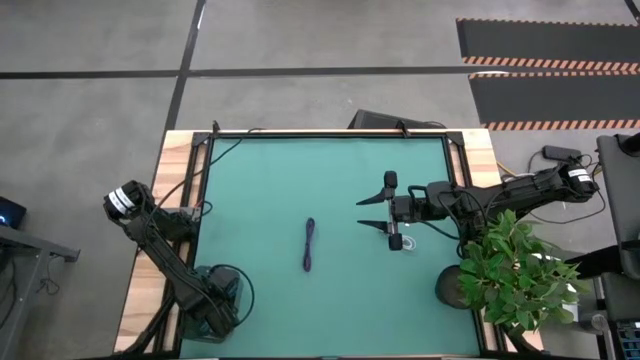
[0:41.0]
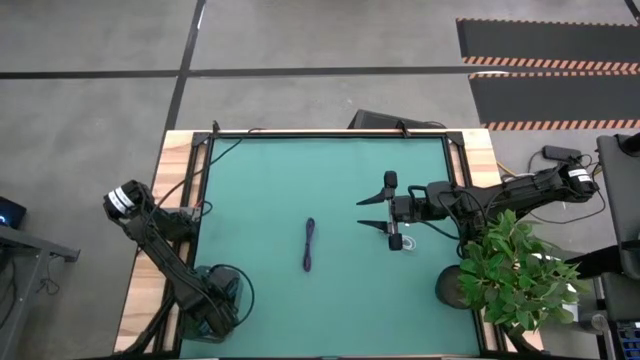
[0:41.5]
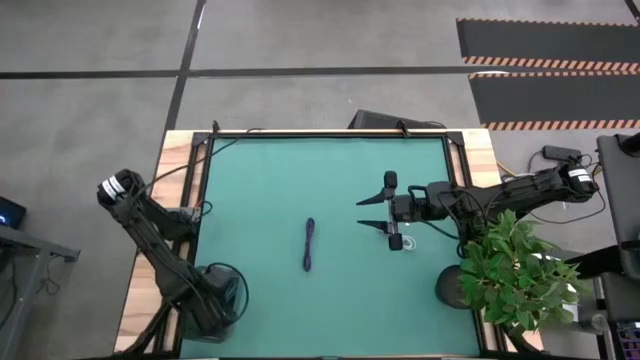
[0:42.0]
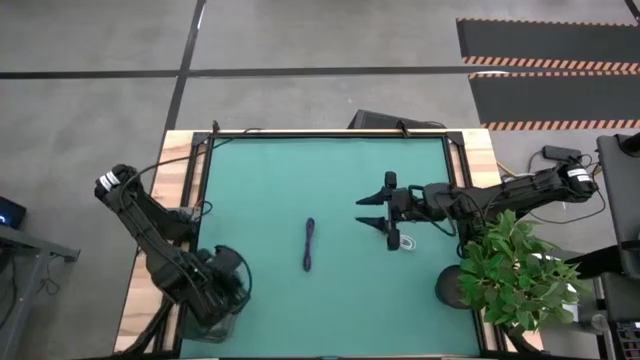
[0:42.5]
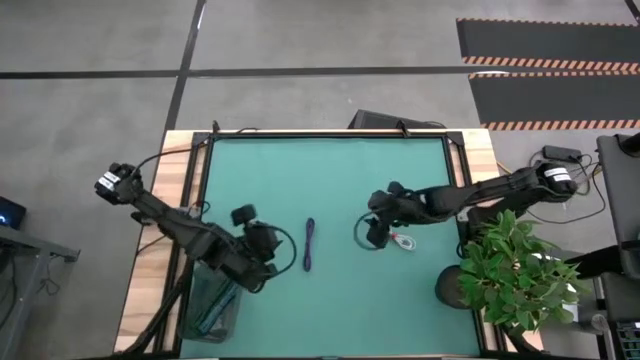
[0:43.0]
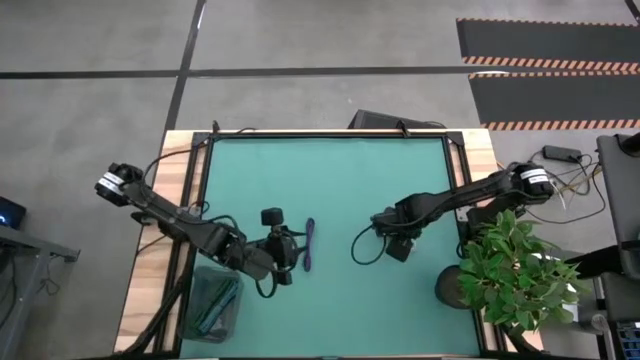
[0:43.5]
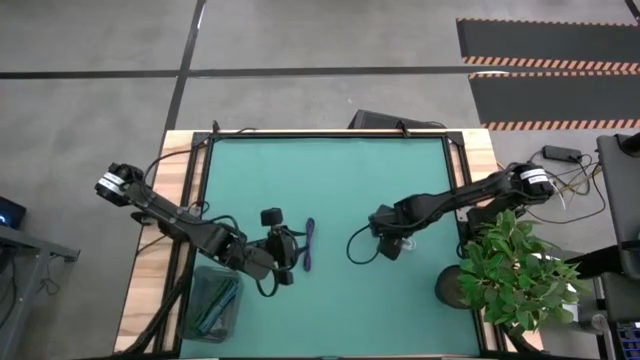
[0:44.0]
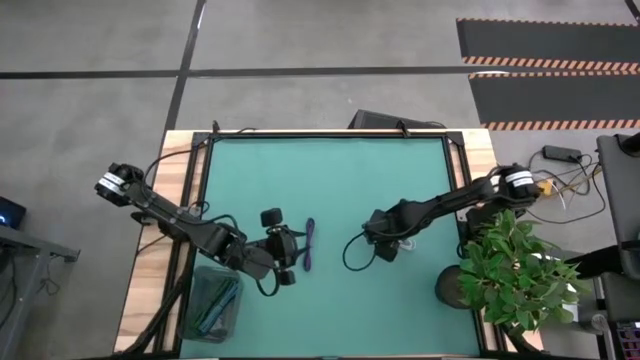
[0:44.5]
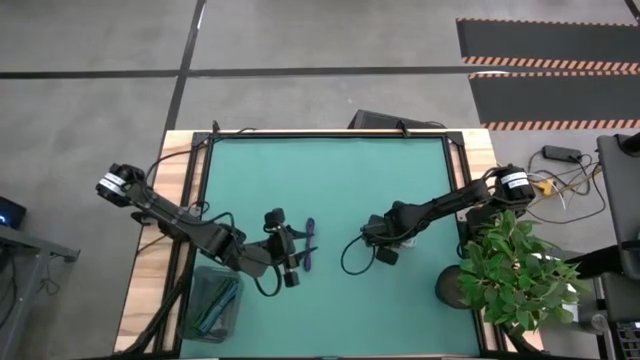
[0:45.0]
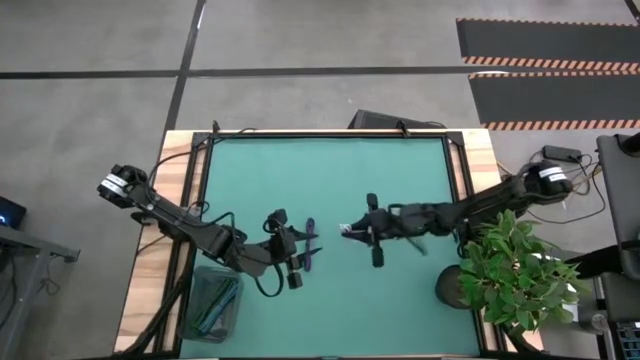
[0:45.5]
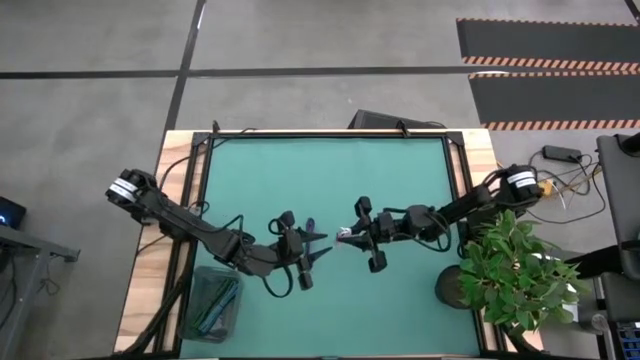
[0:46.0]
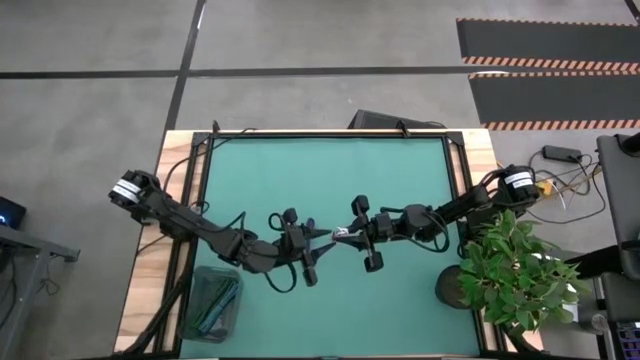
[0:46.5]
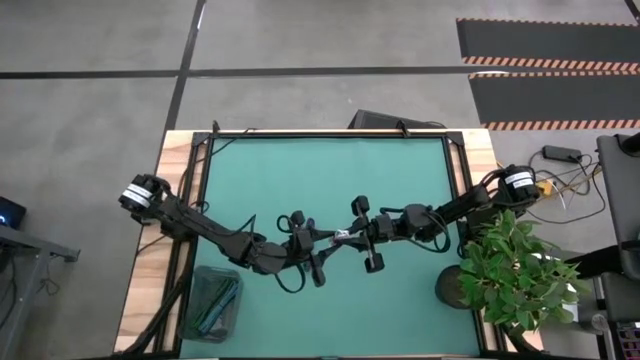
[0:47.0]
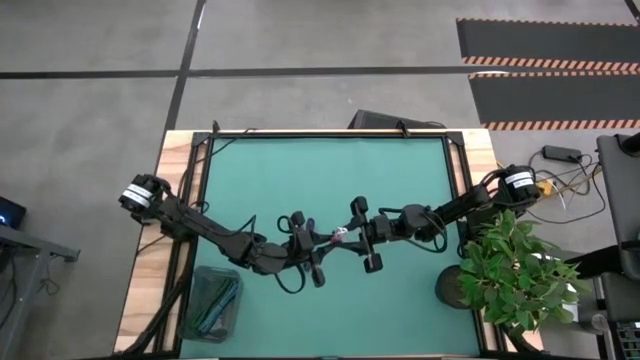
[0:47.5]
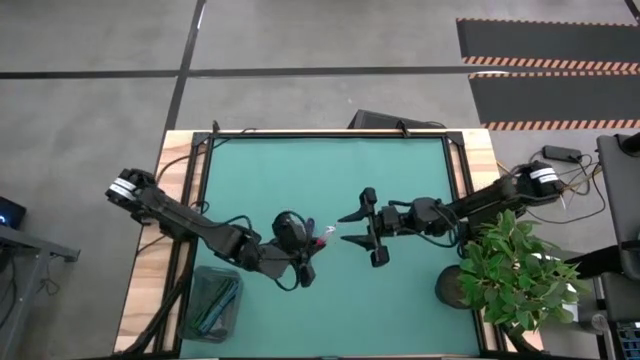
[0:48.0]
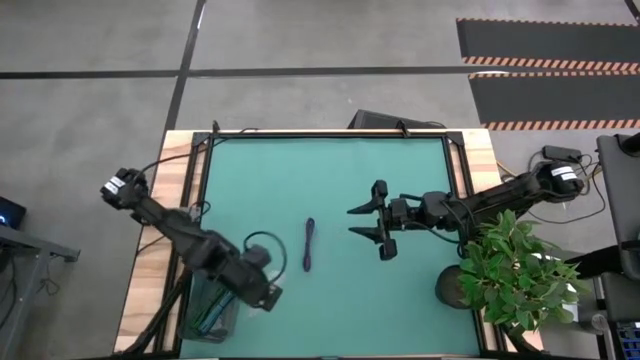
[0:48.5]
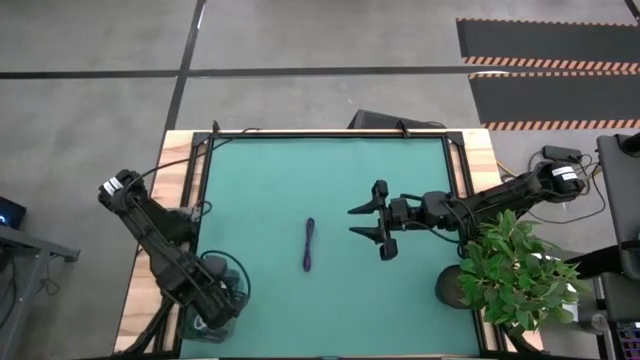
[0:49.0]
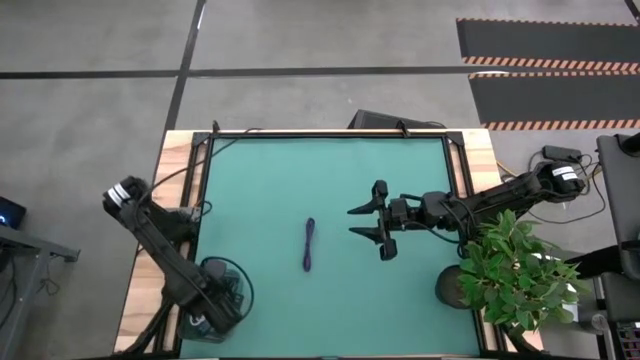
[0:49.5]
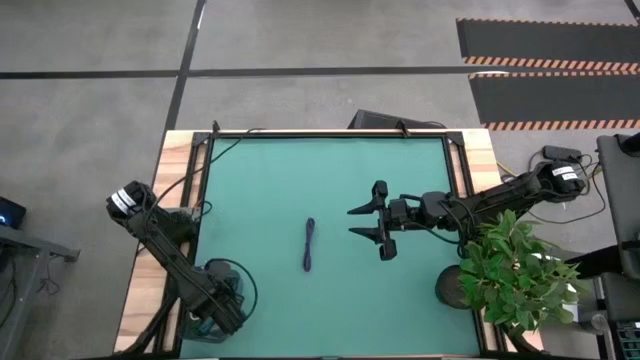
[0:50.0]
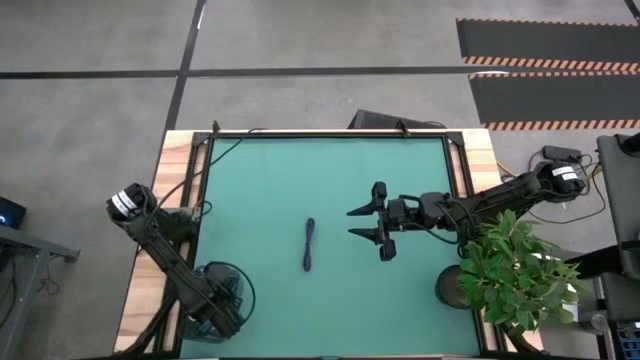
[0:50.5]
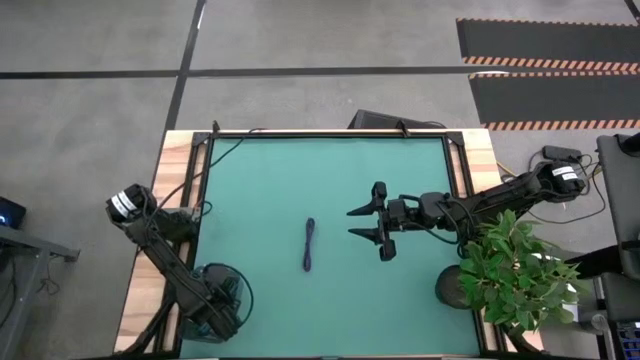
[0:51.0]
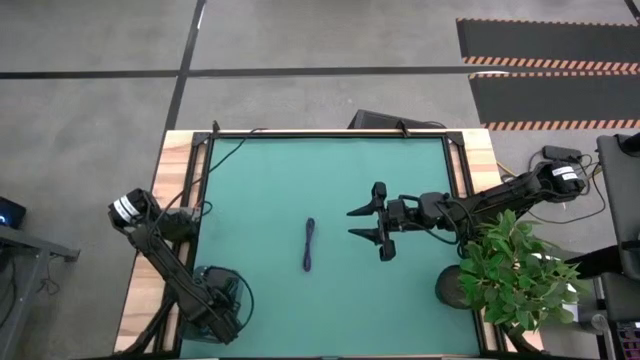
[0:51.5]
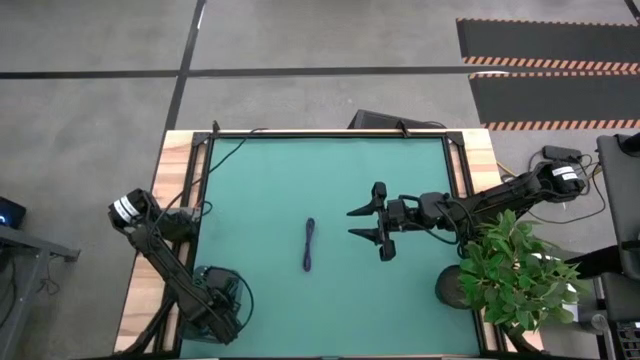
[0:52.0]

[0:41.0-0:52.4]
Task: Pick and place USB-C Cables
Put the white charger cable into the gray bin
